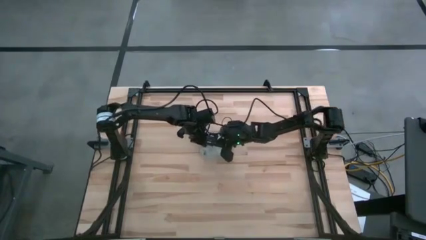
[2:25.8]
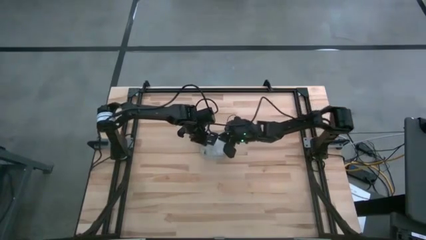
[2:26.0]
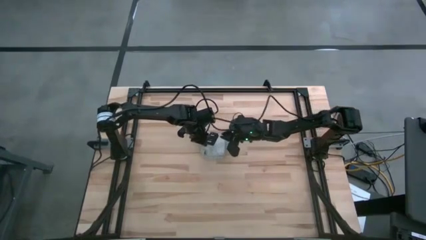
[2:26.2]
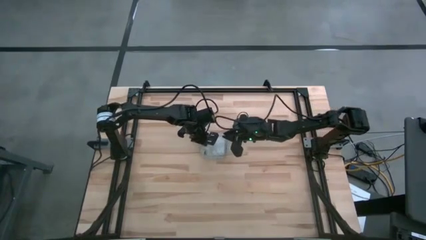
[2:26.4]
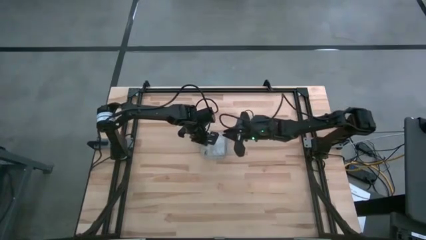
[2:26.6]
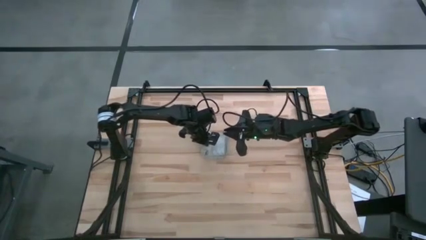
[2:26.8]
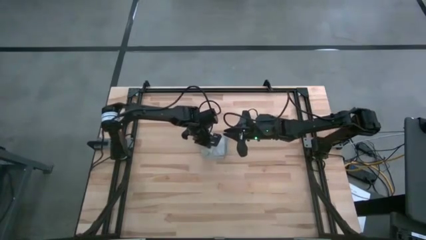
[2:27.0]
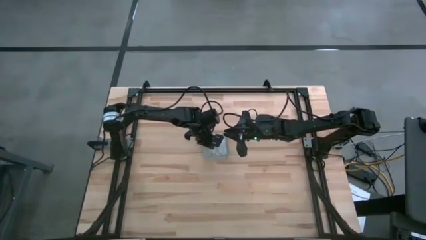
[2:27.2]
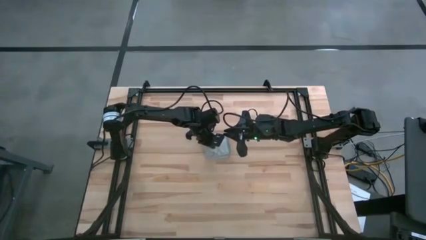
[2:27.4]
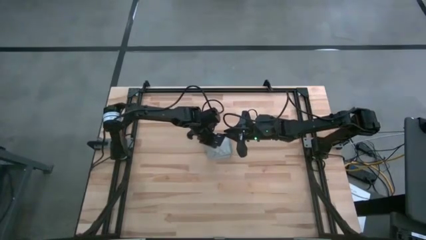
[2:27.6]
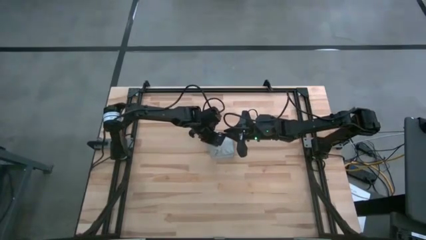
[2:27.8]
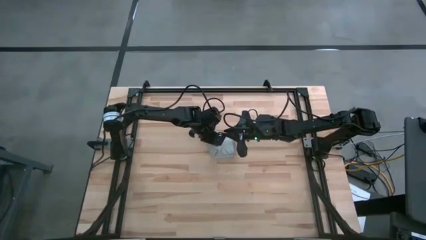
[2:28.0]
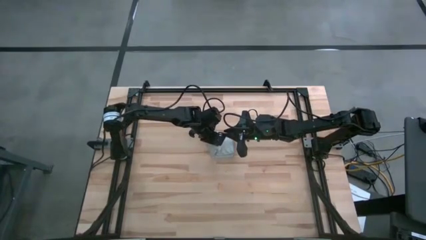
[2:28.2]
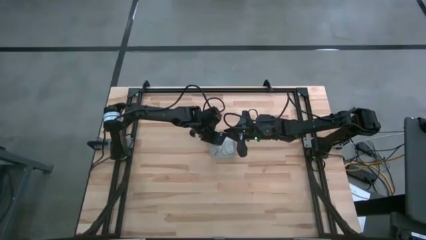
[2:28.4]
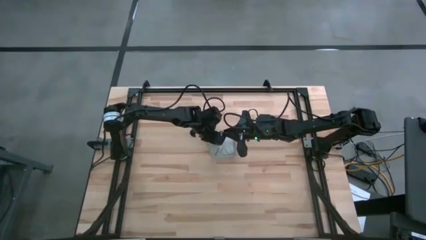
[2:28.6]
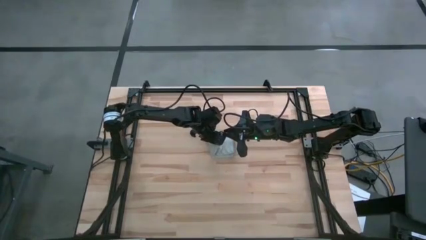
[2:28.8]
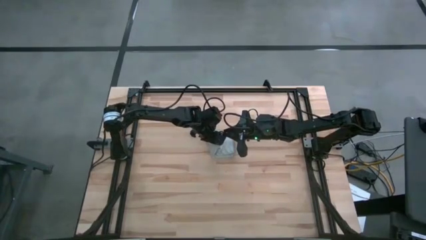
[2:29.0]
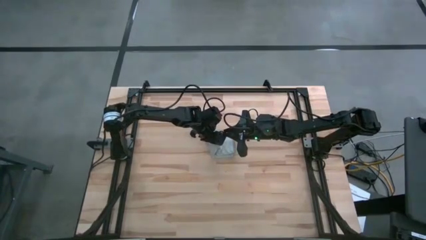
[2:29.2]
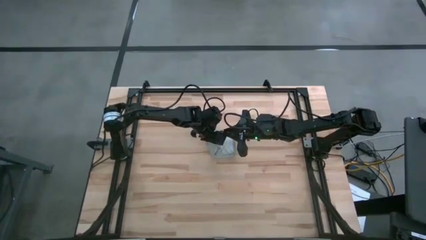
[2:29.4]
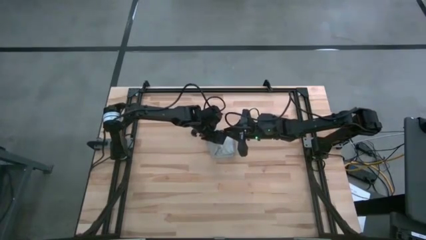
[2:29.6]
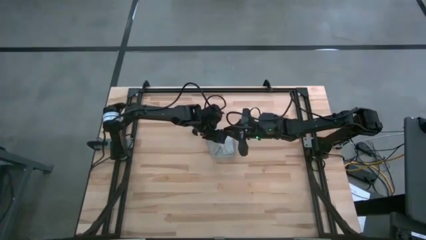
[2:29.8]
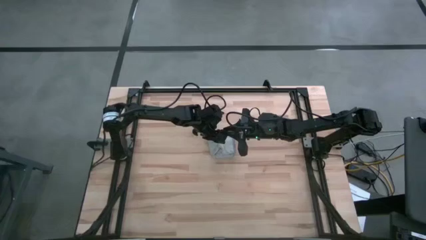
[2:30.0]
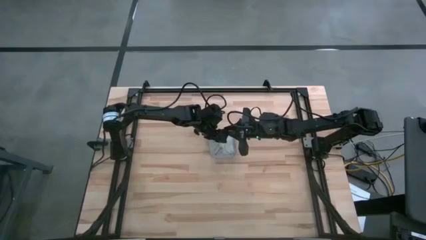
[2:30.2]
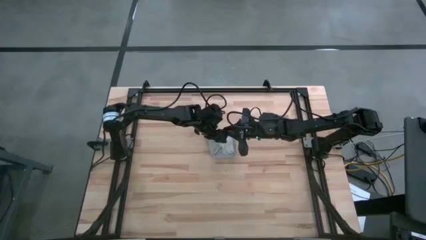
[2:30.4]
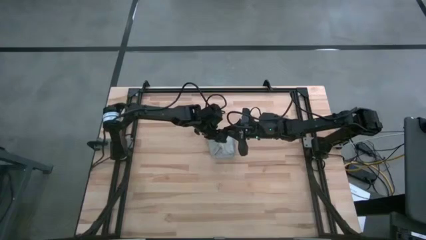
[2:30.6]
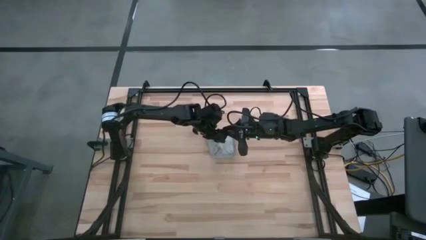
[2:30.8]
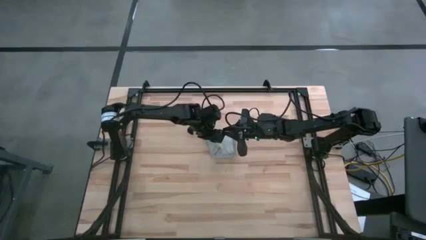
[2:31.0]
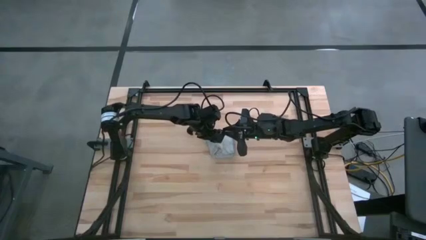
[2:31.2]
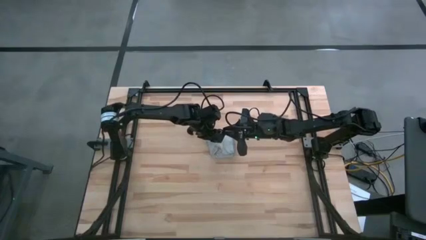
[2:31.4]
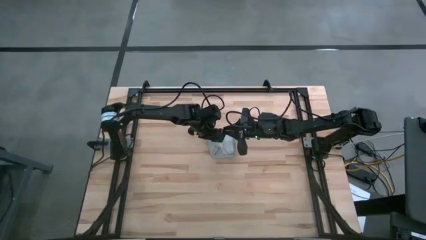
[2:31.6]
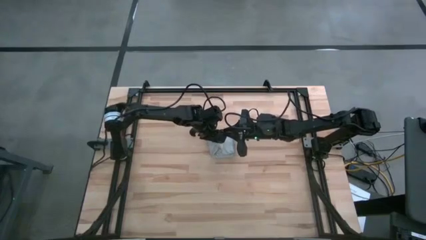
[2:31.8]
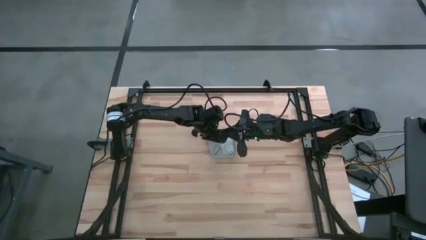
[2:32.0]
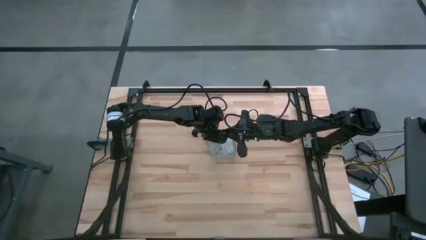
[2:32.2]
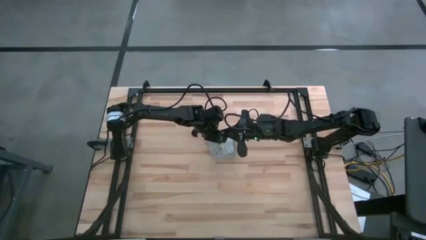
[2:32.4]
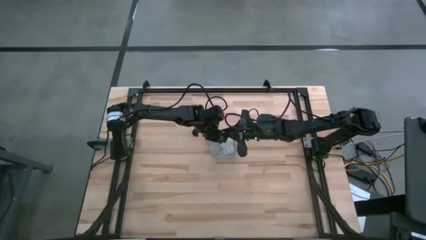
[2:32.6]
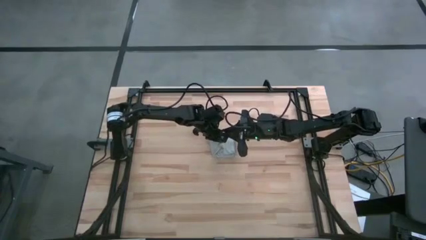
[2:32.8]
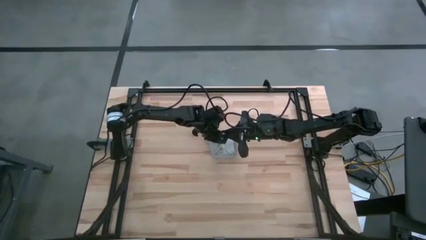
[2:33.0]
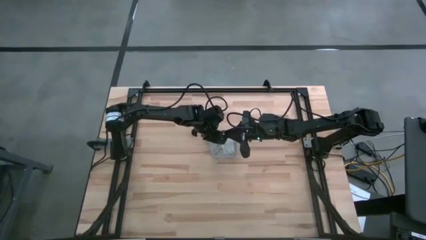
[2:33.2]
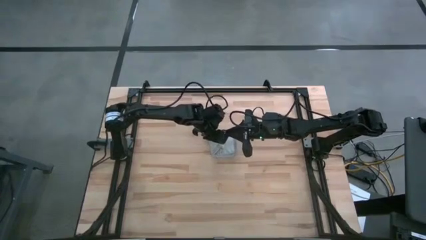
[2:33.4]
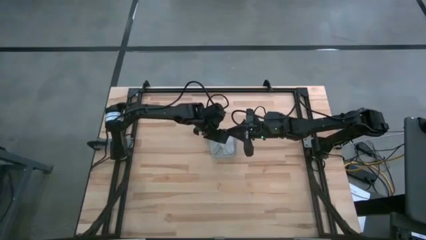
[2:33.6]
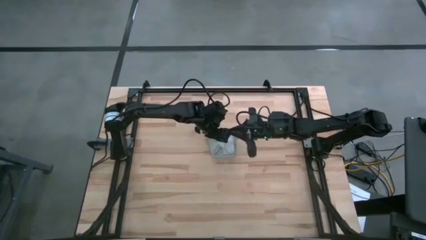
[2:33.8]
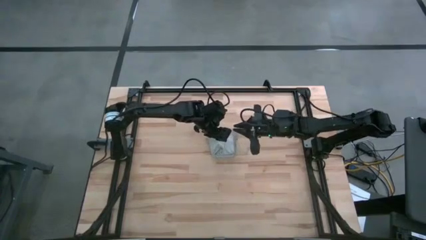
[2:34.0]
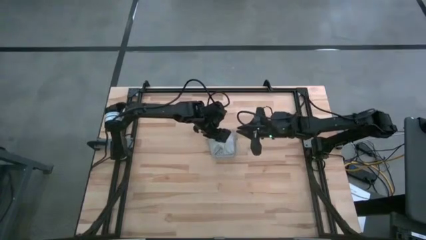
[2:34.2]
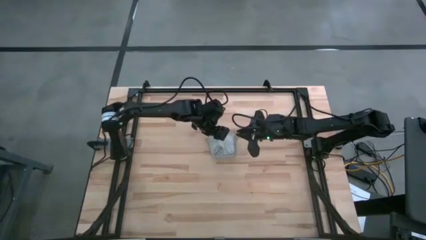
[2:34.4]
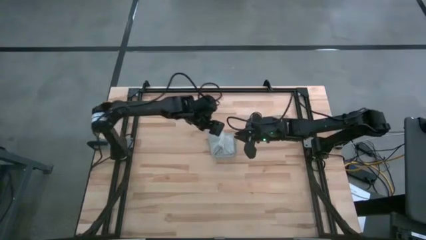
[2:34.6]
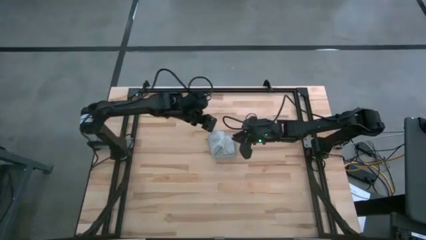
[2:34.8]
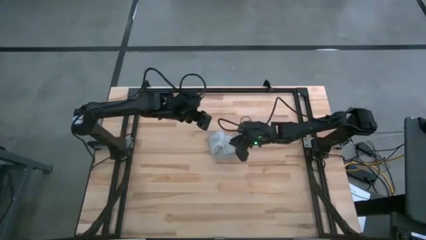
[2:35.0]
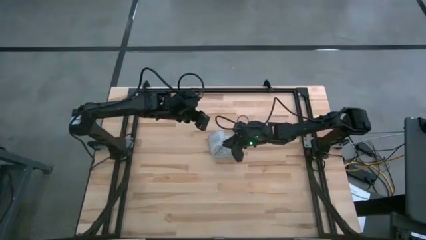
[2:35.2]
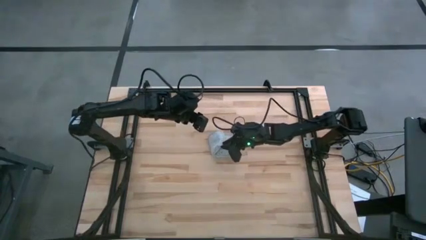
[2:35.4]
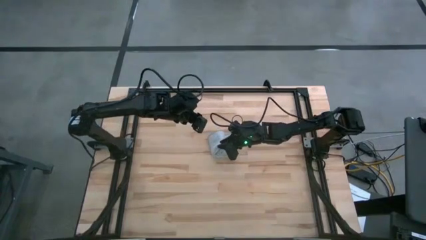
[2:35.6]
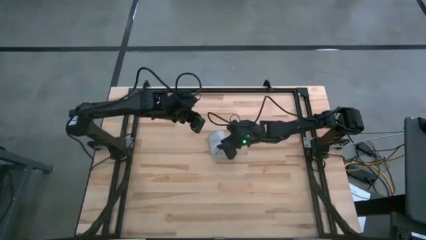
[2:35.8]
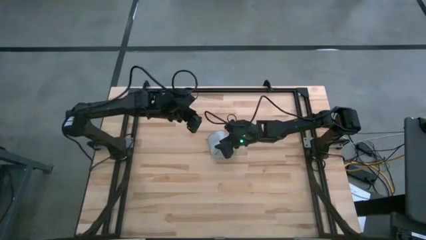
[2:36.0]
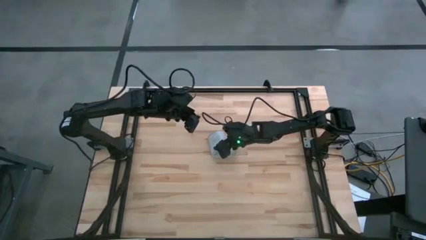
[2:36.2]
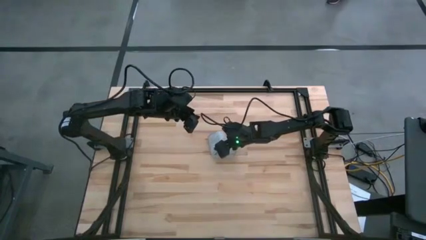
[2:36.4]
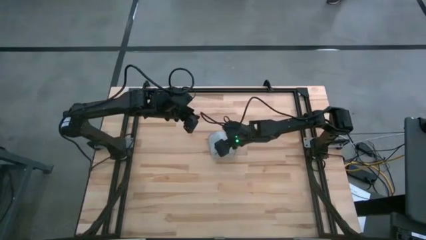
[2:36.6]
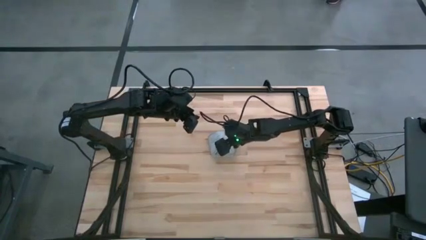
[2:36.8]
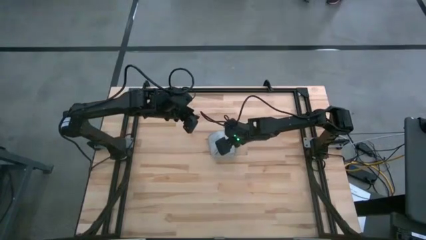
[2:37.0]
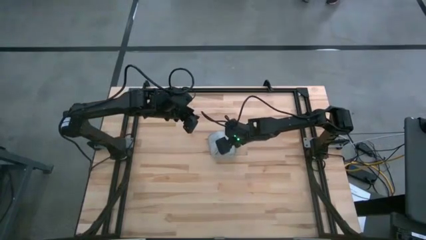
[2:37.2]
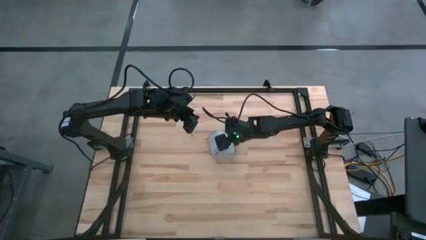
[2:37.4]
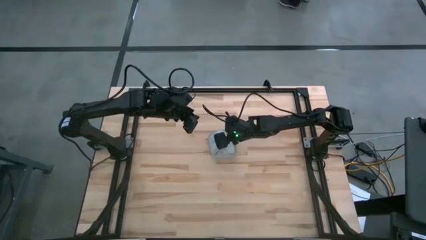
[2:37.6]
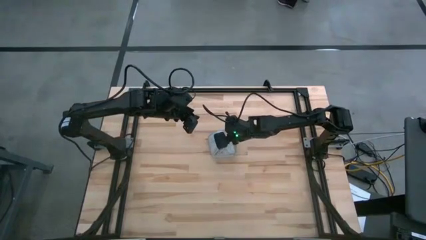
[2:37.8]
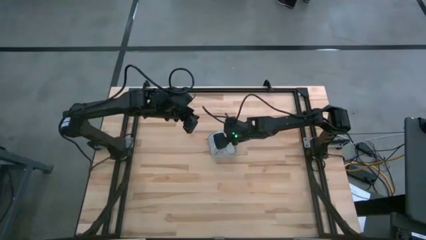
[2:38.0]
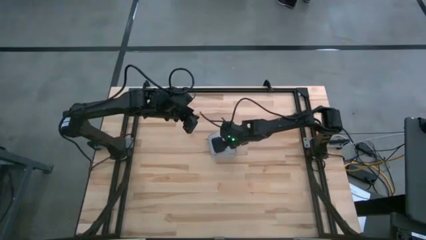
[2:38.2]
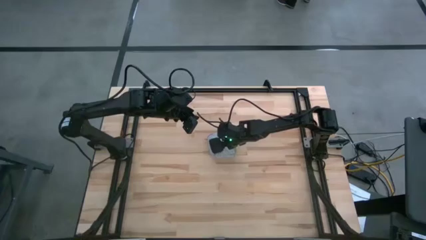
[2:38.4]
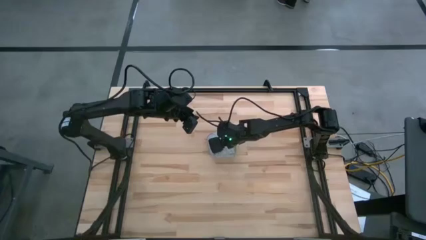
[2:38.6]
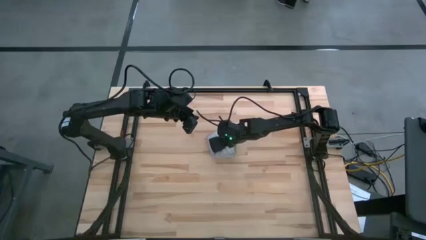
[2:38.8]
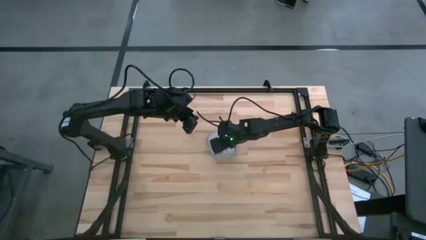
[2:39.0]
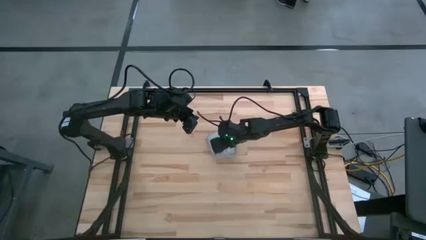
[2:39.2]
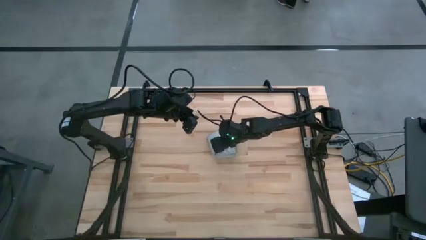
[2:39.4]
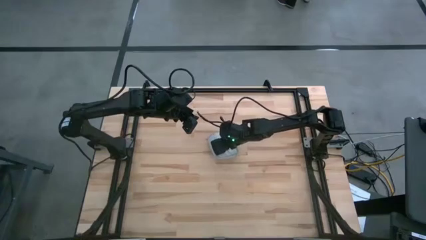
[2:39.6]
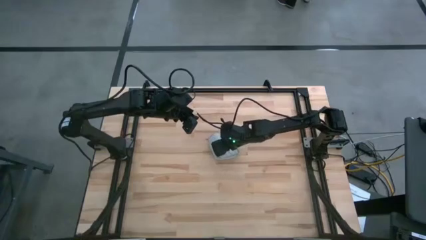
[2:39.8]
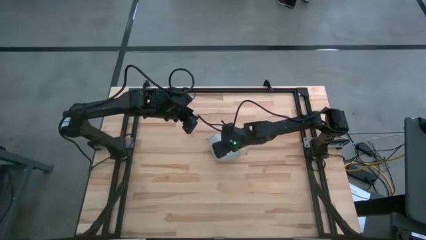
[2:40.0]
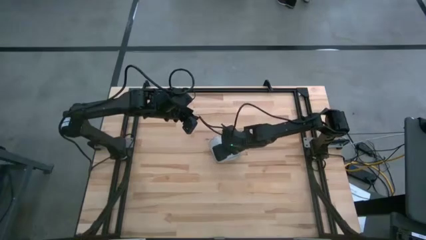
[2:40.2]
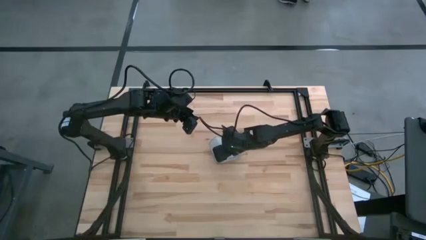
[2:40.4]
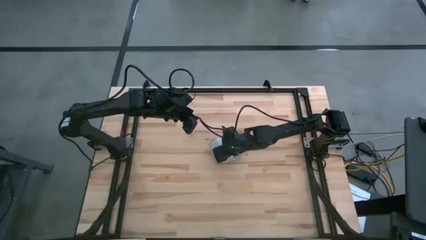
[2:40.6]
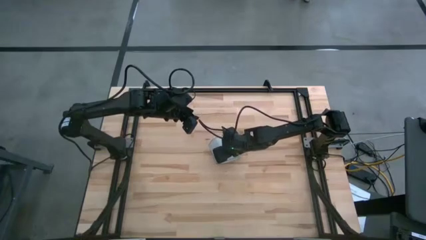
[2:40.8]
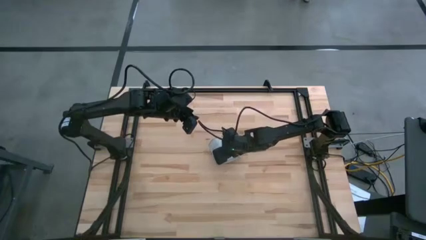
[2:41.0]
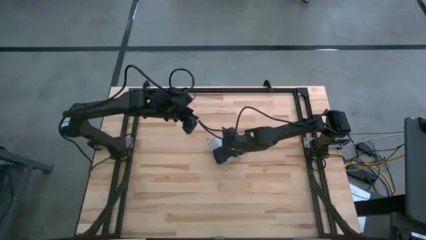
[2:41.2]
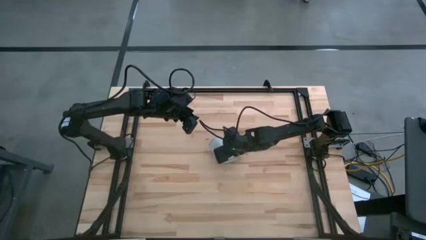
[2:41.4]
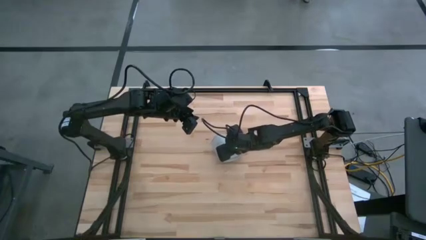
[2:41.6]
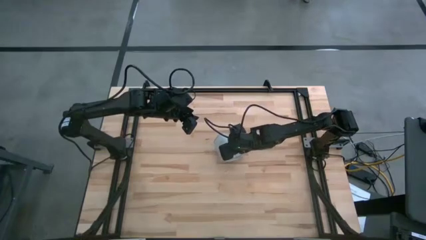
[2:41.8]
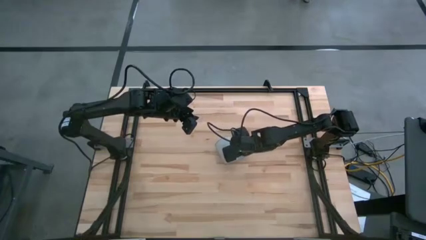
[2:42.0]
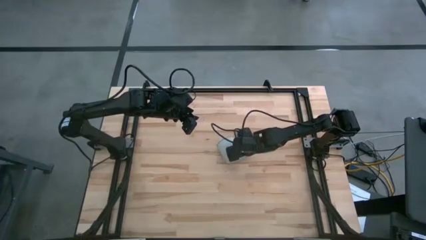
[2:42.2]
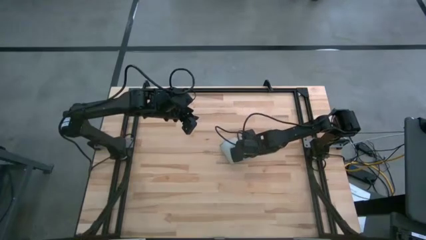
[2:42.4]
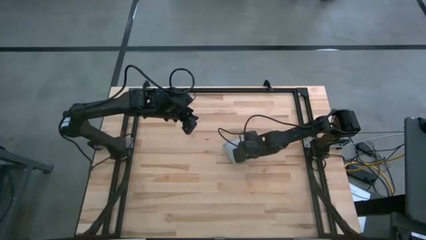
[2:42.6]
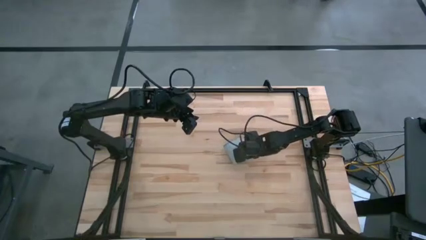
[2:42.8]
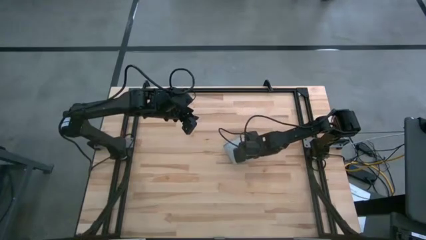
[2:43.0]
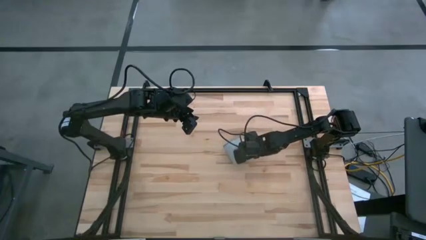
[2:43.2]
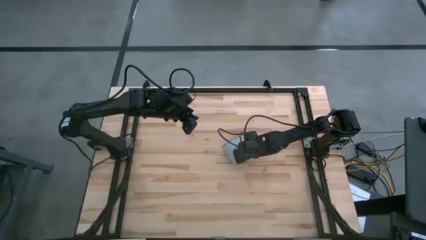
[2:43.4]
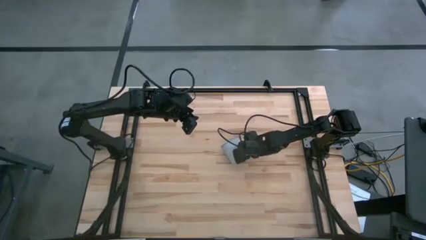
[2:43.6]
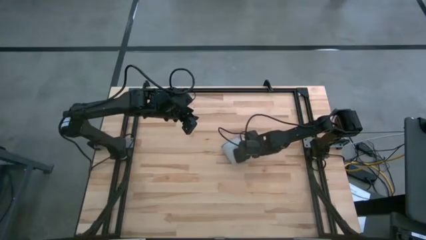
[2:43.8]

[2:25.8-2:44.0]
Task: Fold microfiber towels
Fold the gray on the table
